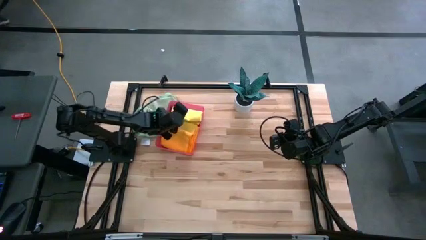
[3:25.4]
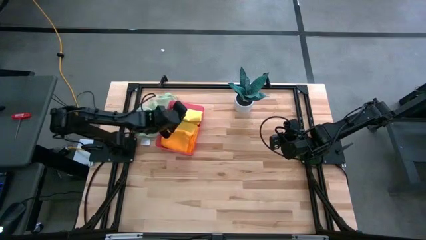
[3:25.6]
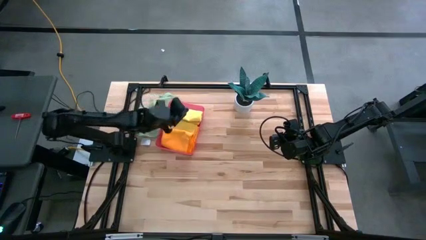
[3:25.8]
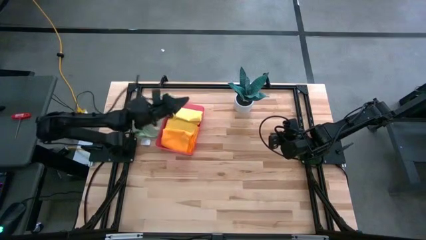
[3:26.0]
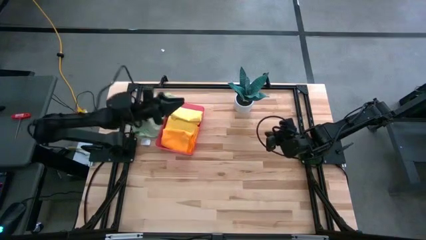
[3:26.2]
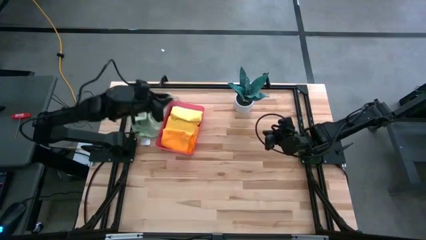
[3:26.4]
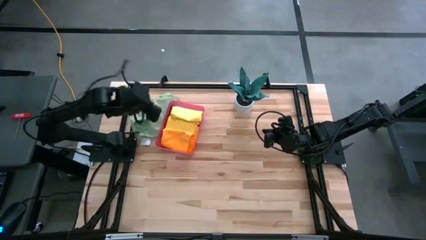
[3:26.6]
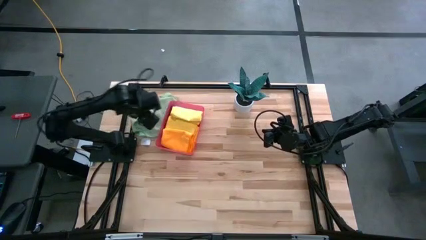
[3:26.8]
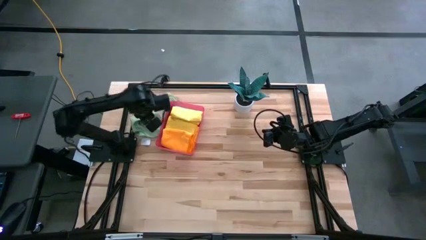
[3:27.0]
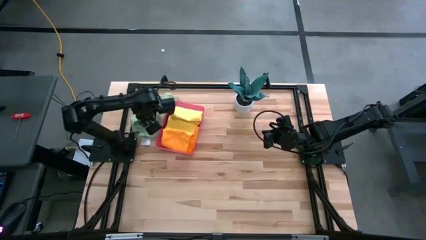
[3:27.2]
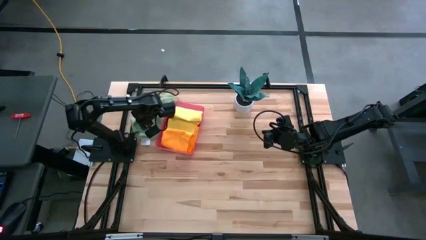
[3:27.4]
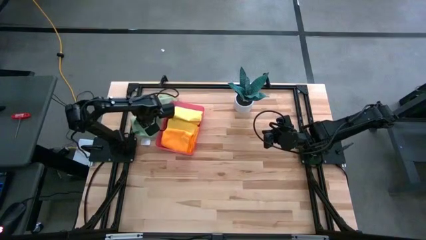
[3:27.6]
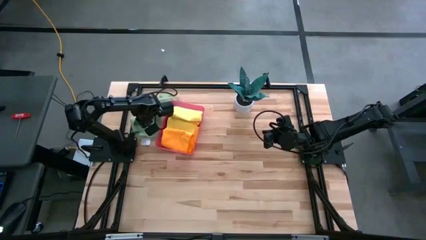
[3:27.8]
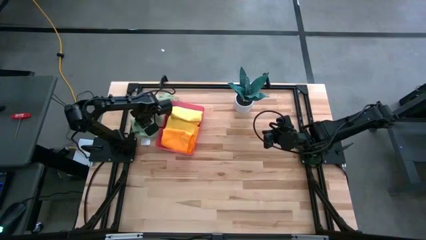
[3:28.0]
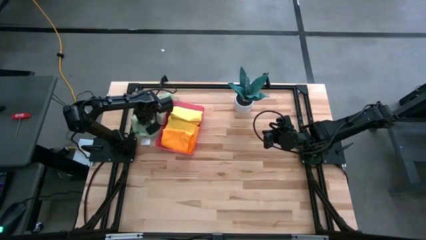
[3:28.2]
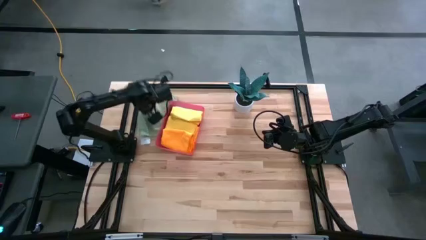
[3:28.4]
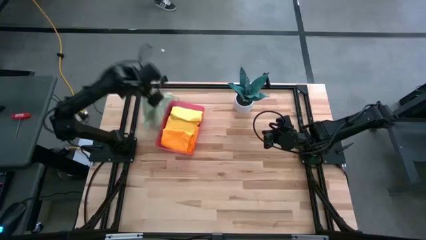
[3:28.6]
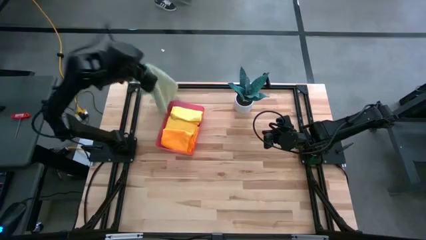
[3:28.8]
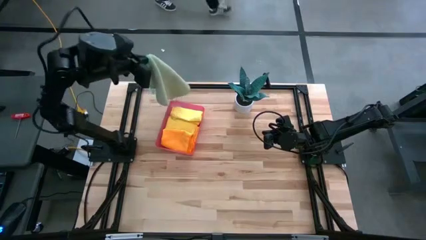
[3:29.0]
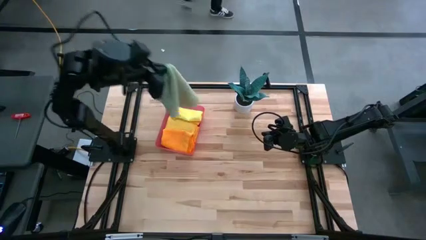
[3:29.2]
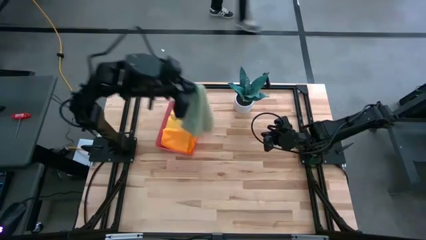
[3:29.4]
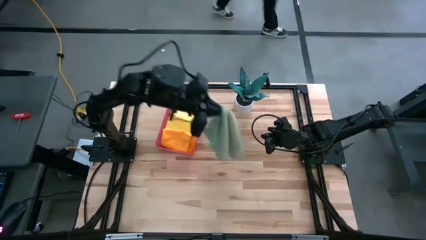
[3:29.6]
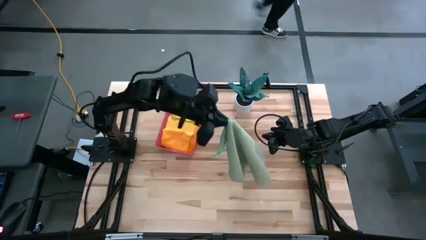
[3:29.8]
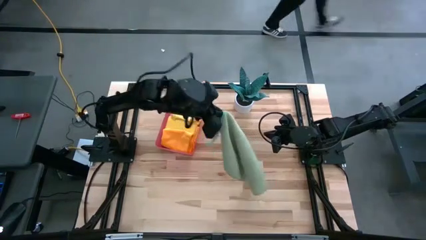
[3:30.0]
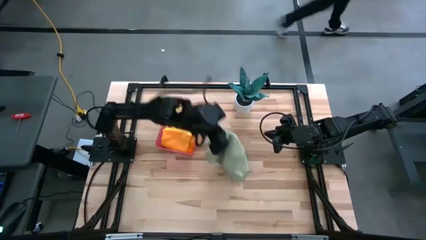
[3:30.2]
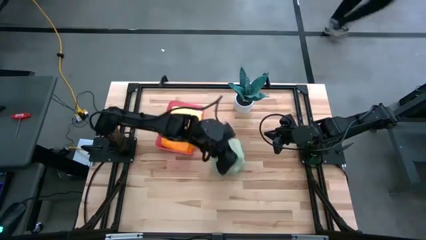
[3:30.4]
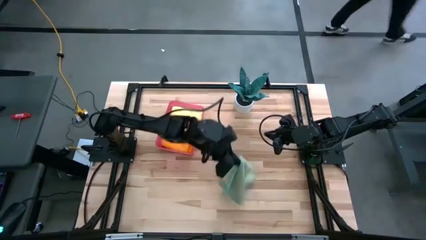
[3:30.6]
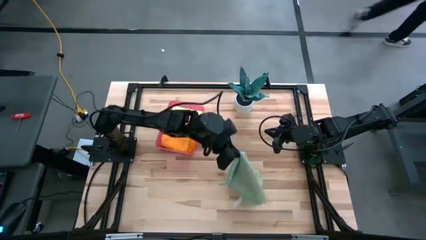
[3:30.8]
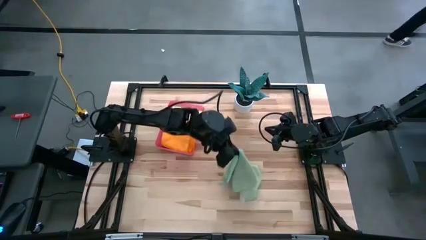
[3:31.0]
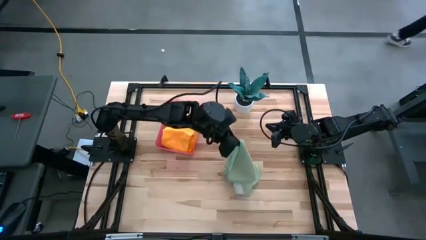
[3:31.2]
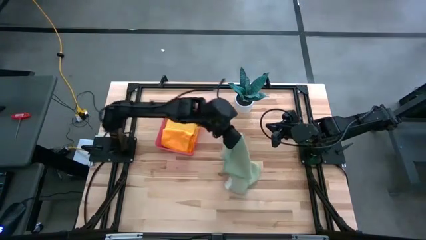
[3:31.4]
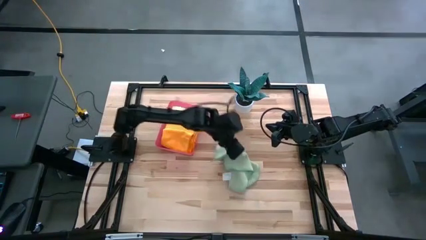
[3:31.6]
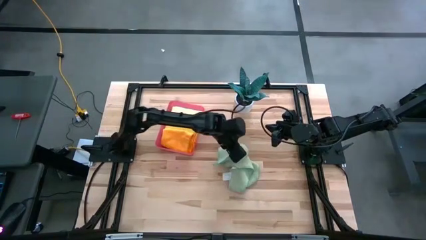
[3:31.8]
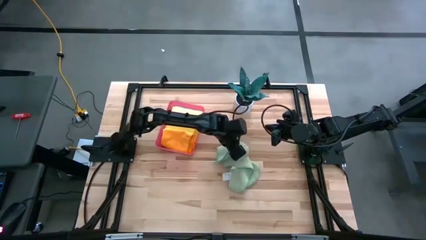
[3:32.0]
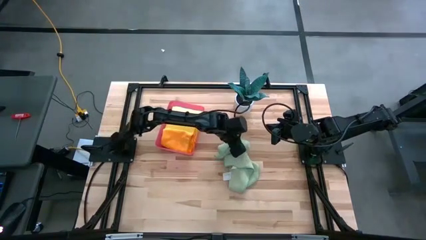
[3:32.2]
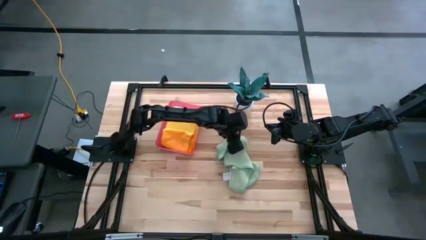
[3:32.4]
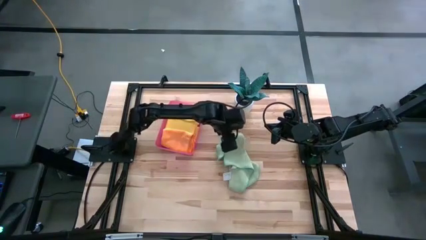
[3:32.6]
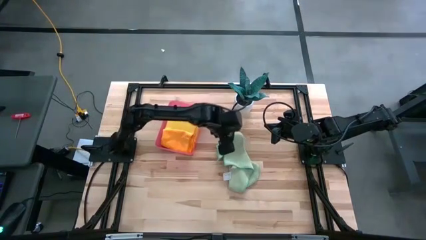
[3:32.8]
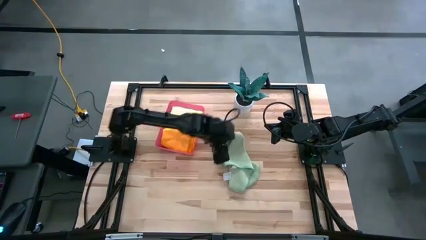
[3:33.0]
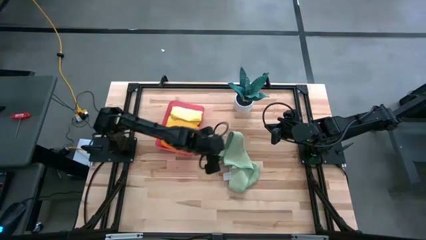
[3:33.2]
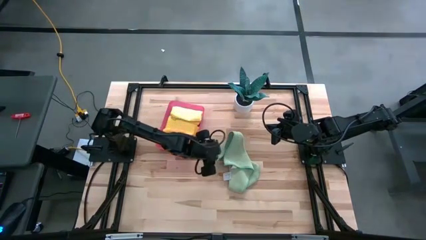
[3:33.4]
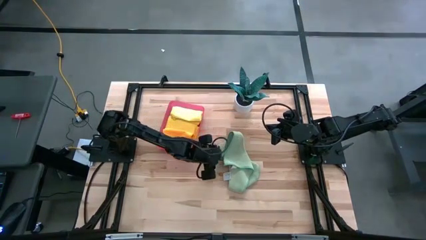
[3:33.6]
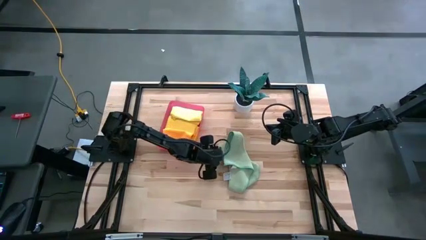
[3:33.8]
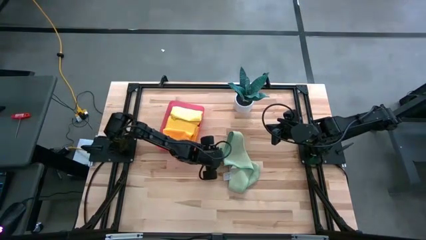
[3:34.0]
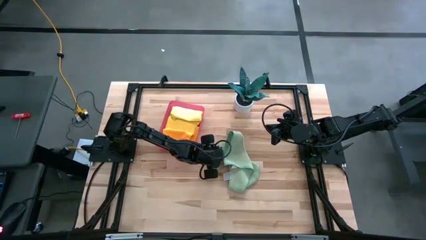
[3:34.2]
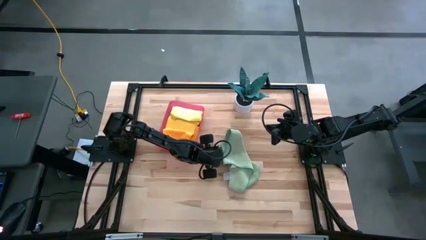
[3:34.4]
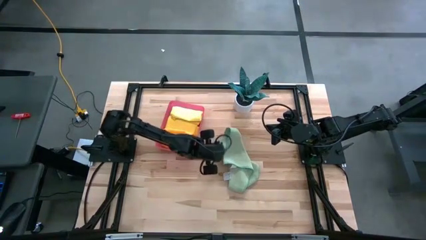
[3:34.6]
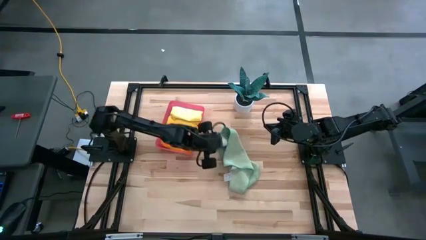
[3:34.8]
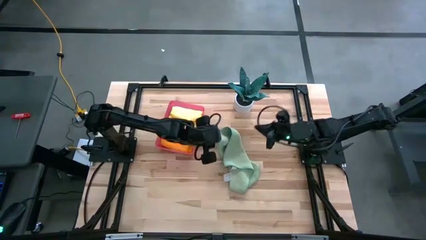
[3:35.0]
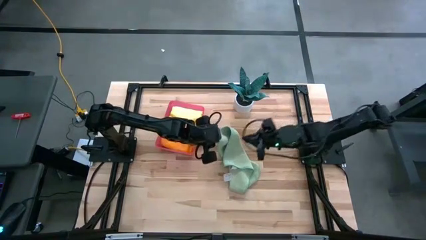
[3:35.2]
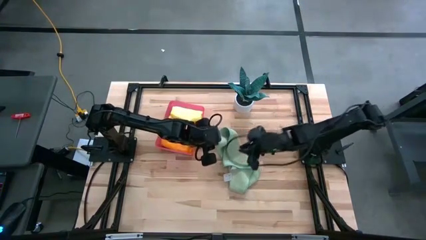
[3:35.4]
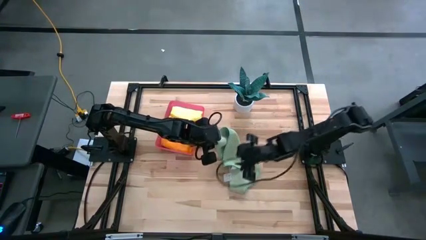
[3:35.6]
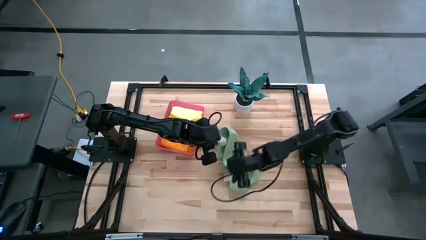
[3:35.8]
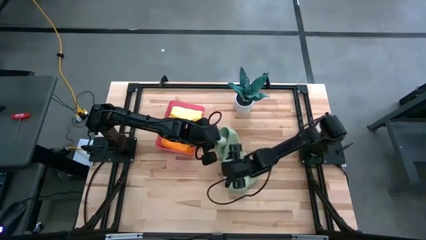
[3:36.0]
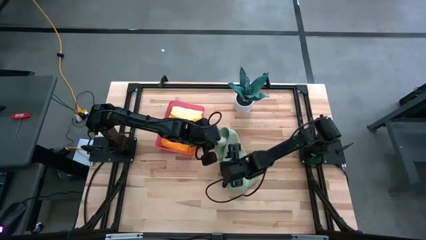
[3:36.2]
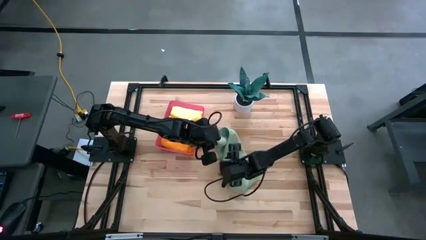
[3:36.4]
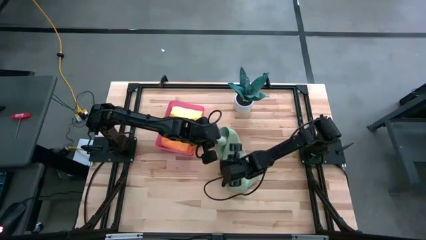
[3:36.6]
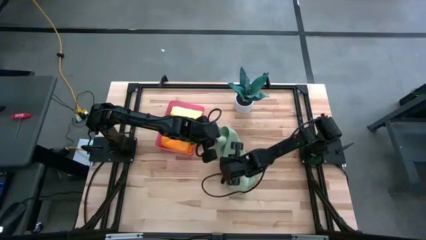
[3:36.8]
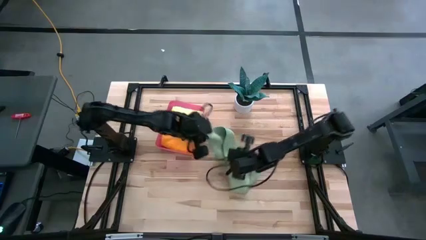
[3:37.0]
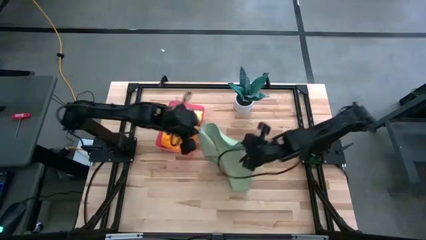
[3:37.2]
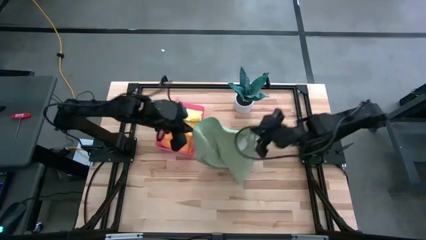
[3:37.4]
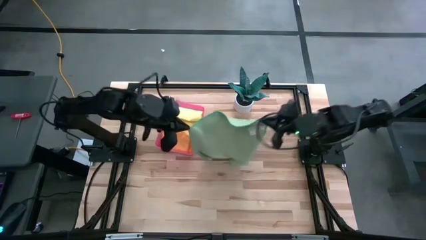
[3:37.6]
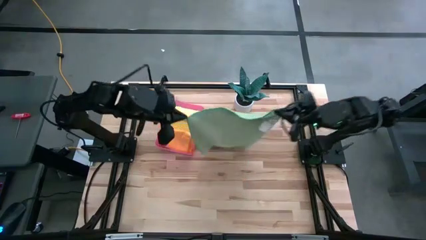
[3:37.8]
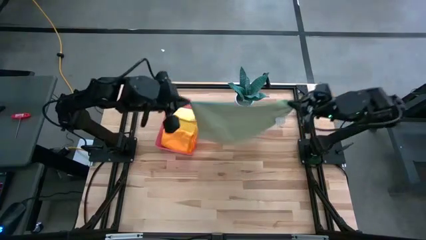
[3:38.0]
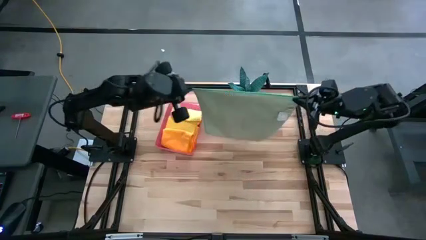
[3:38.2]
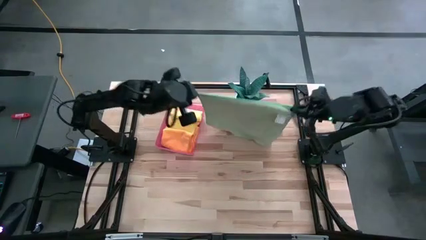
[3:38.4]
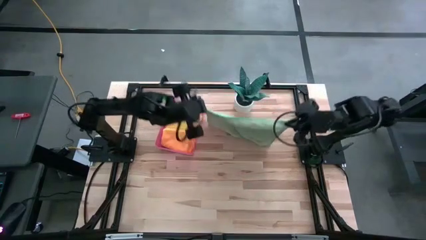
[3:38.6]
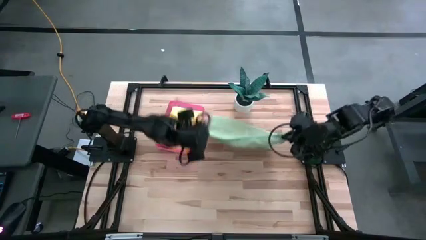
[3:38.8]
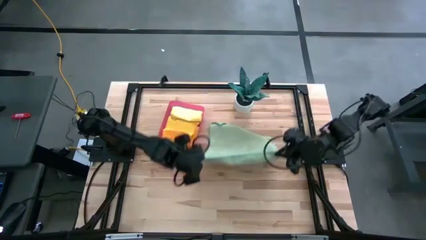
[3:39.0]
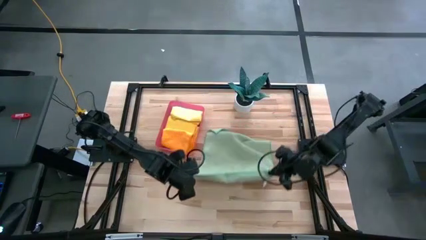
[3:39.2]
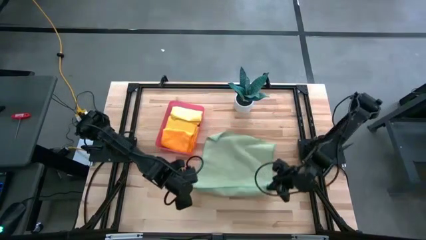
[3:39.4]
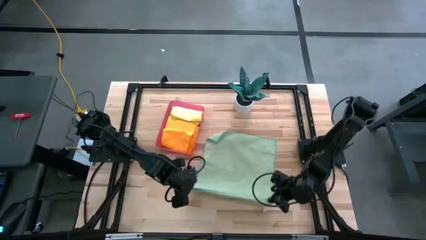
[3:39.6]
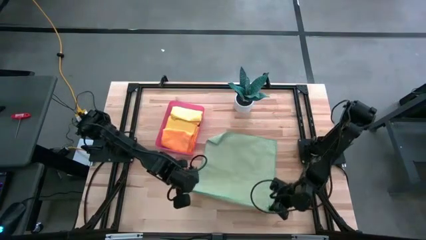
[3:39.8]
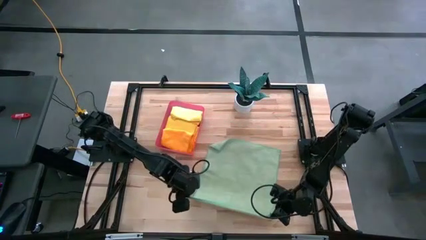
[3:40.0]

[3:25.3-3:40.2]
Task: Fold microfiber towels
Fold the green microfiber cloth

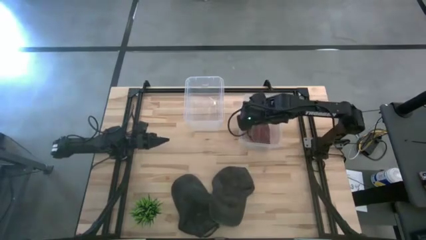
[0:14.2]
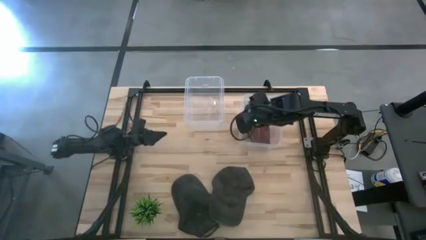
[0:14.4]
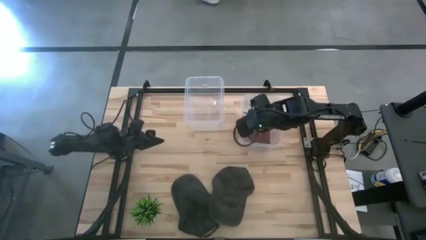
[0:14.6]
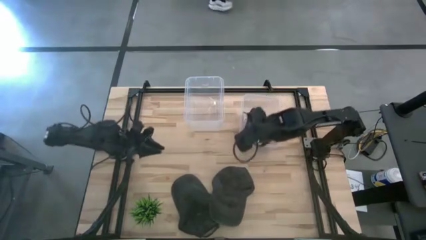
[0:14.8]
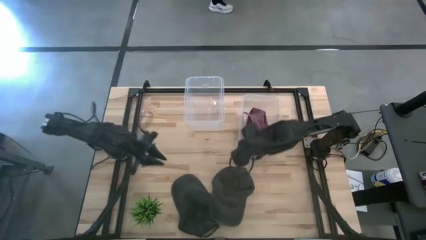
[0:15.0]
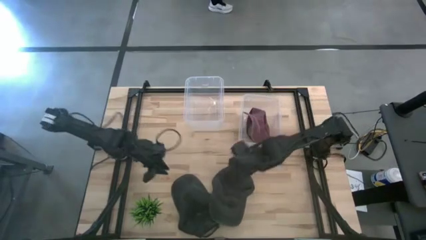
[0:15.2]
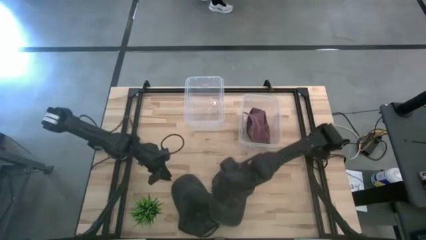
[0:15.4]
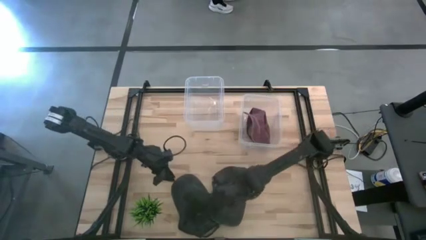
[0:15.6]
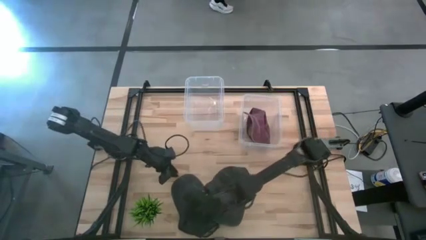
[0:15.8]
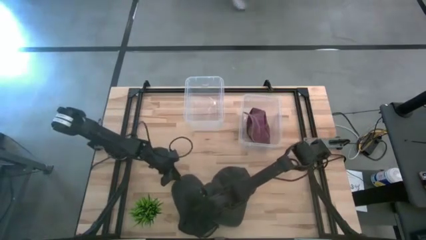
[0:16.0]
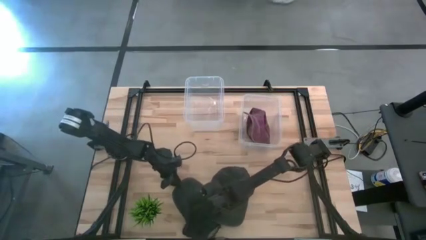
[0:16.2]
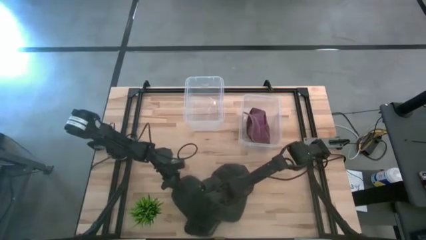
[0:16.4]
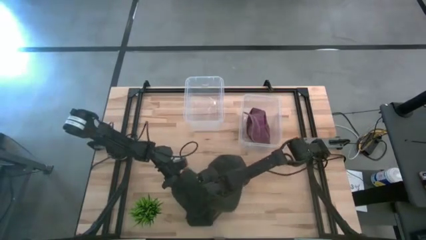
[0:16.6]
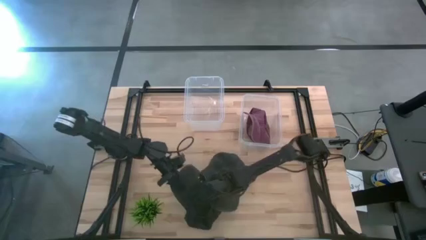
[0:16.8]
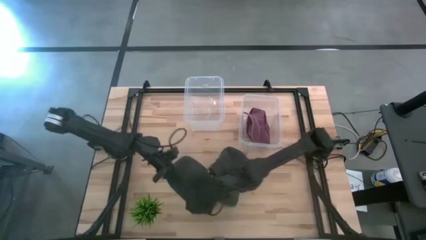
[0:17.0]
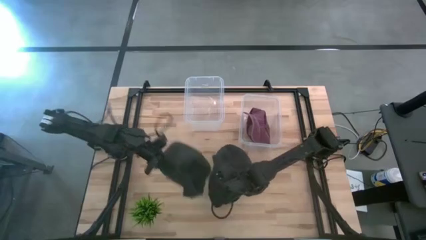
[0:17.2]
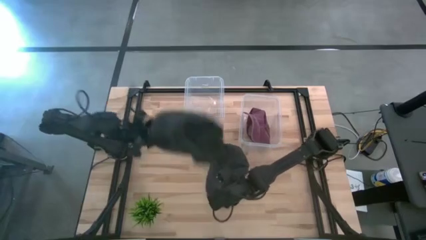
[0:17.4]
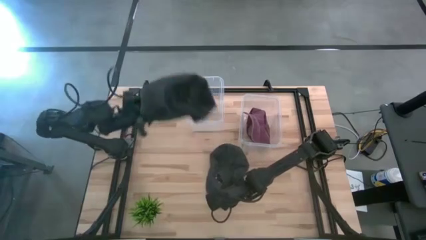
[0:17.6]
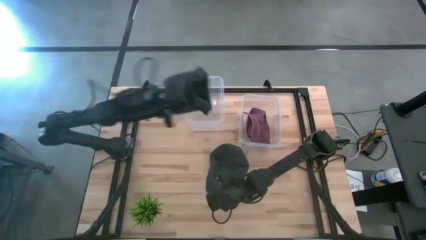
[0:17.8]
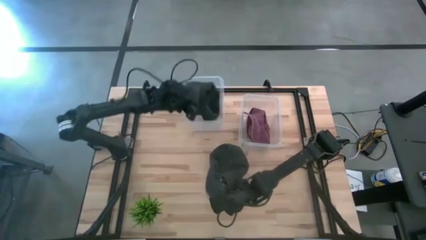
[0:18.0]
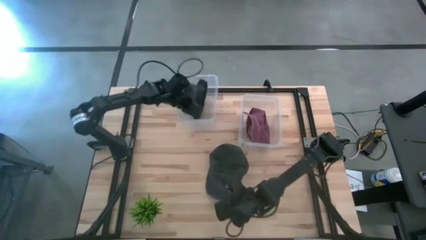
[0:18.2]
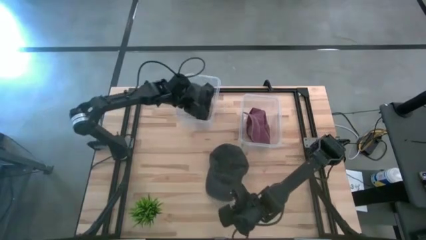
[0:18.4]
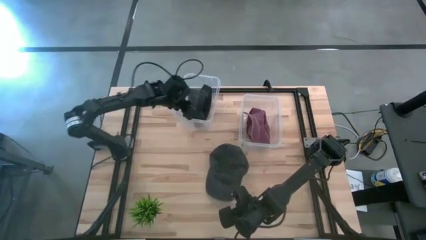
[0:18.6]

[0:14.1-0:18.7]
Task: Pick & Place hat
Put the left black cap into the left transparent bin
